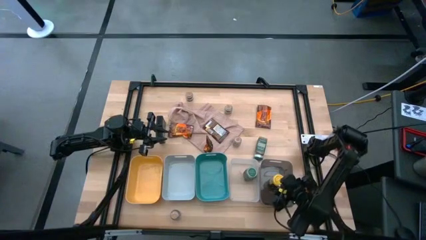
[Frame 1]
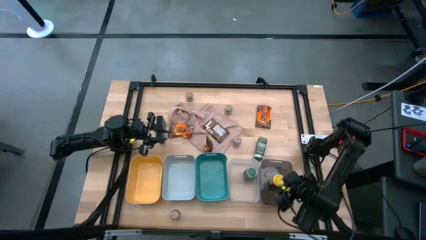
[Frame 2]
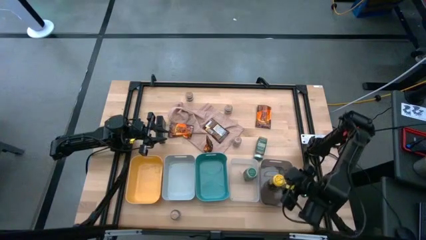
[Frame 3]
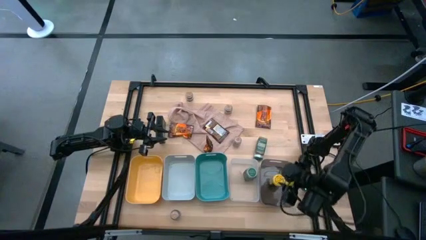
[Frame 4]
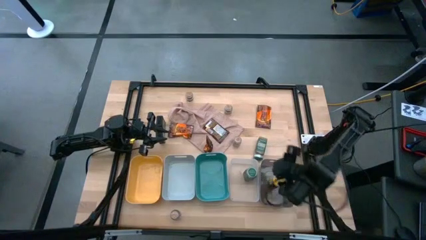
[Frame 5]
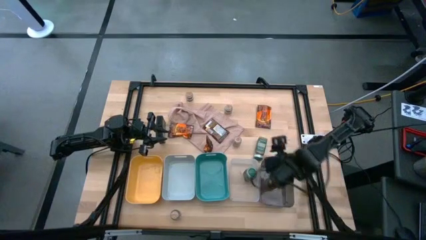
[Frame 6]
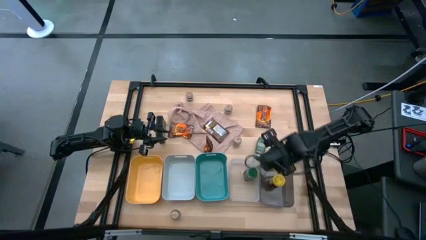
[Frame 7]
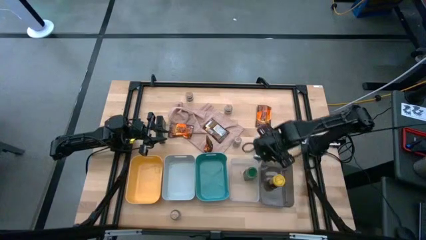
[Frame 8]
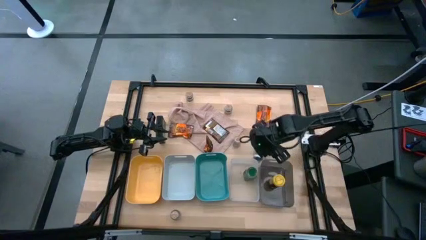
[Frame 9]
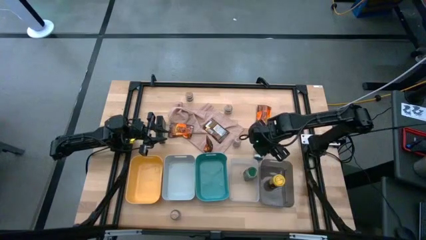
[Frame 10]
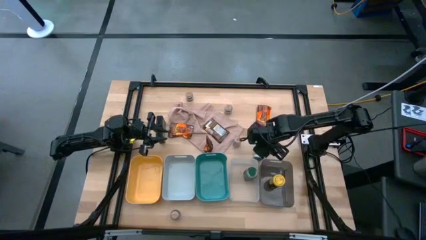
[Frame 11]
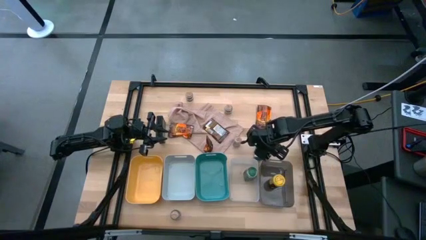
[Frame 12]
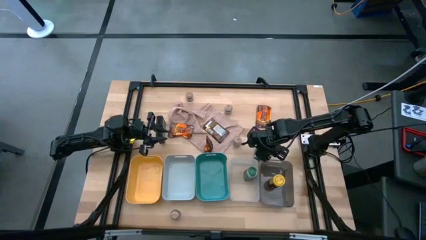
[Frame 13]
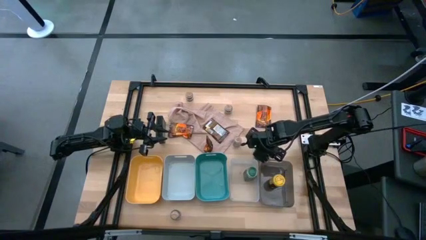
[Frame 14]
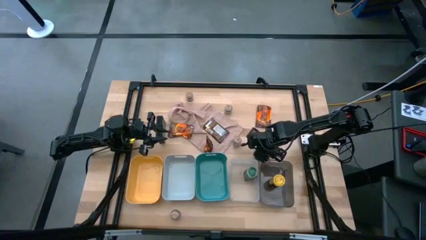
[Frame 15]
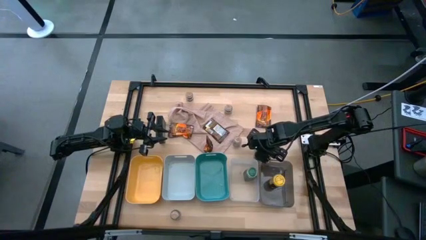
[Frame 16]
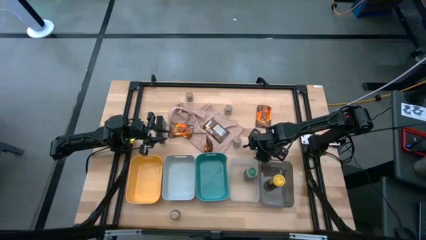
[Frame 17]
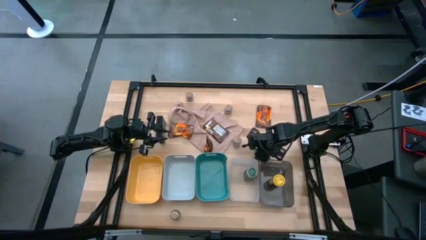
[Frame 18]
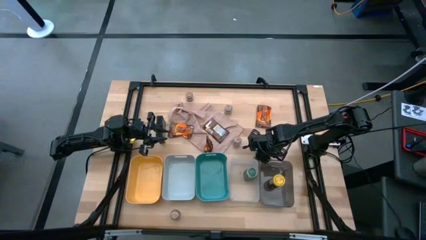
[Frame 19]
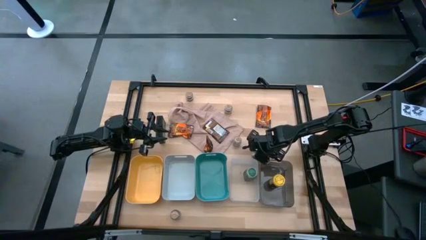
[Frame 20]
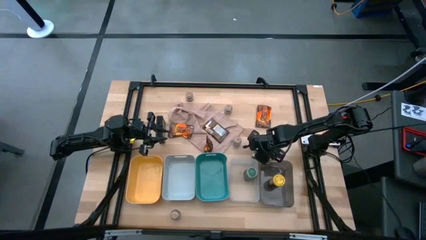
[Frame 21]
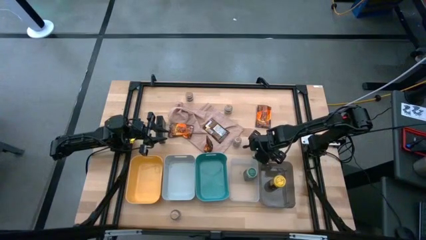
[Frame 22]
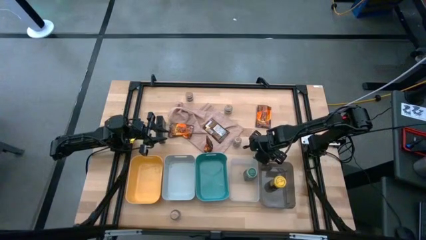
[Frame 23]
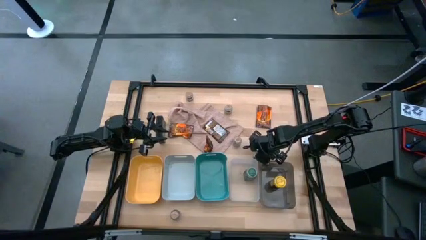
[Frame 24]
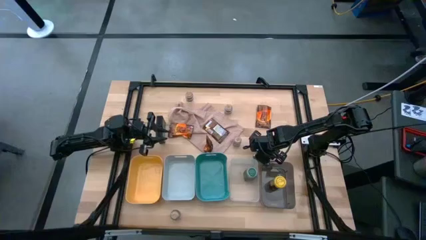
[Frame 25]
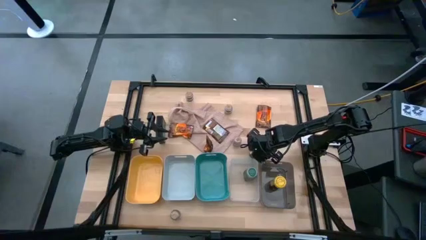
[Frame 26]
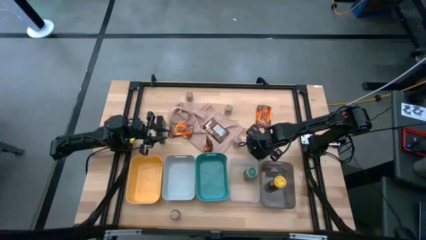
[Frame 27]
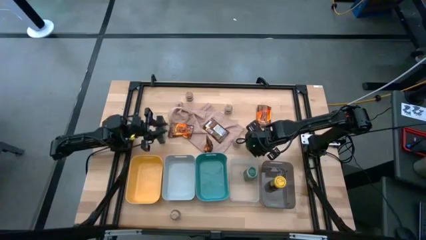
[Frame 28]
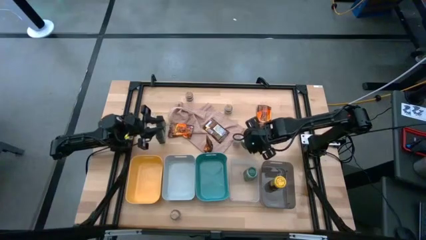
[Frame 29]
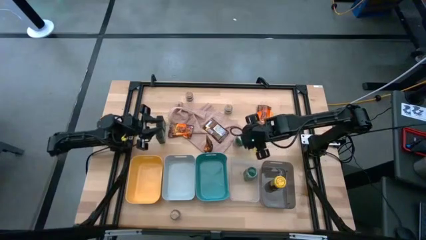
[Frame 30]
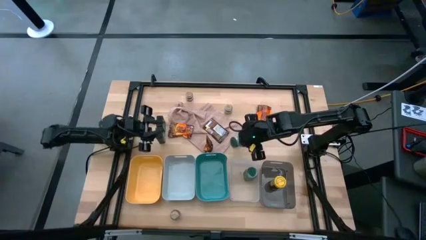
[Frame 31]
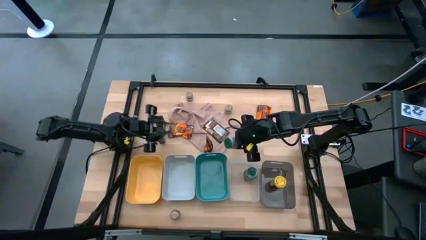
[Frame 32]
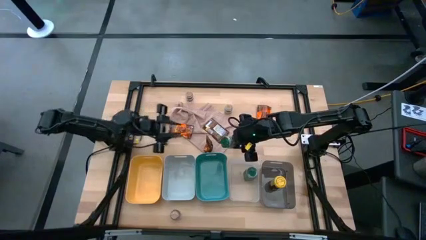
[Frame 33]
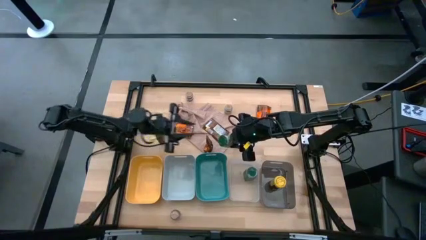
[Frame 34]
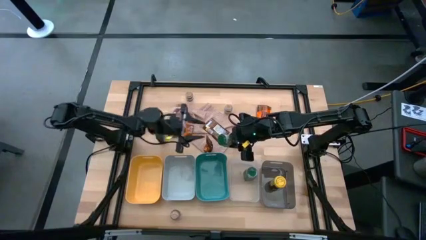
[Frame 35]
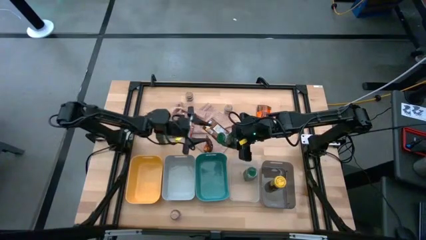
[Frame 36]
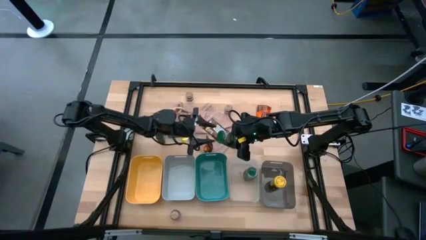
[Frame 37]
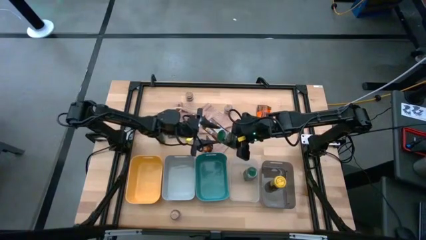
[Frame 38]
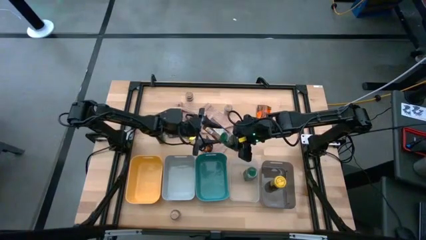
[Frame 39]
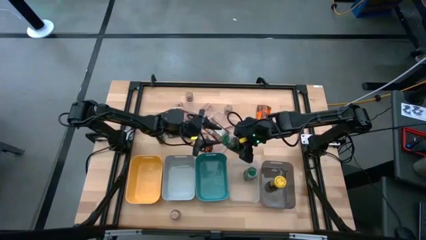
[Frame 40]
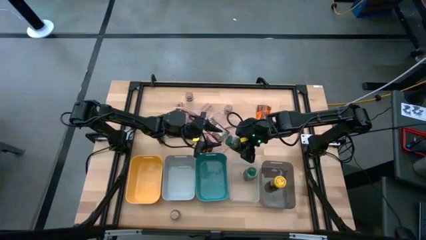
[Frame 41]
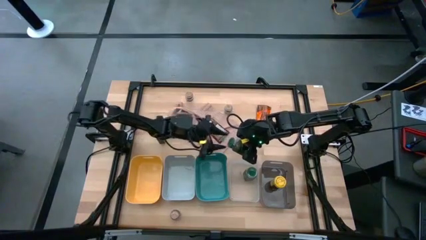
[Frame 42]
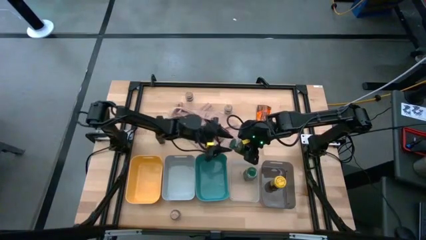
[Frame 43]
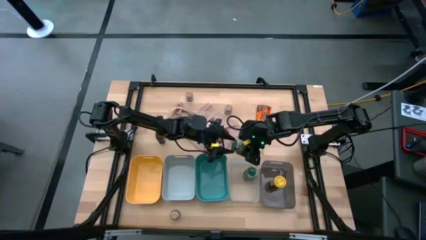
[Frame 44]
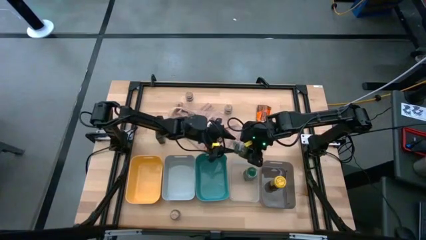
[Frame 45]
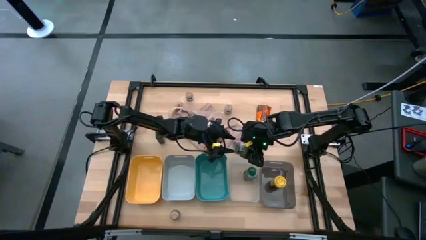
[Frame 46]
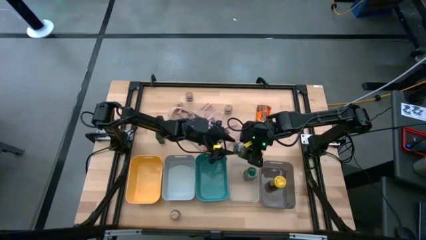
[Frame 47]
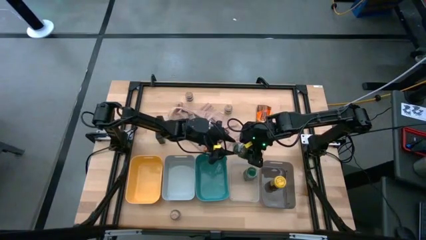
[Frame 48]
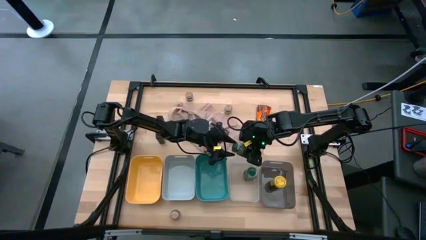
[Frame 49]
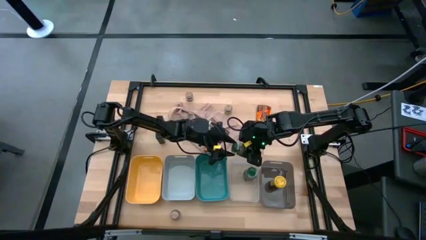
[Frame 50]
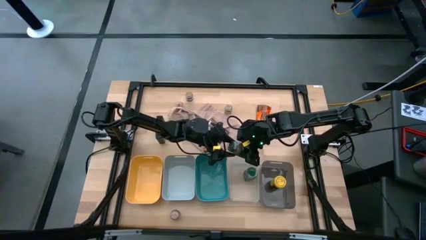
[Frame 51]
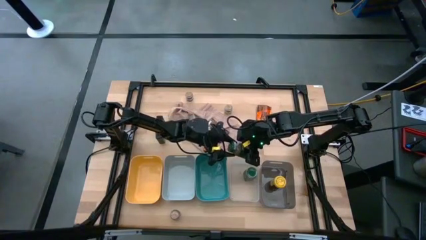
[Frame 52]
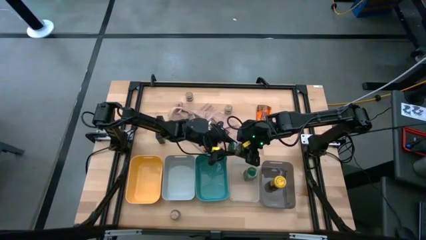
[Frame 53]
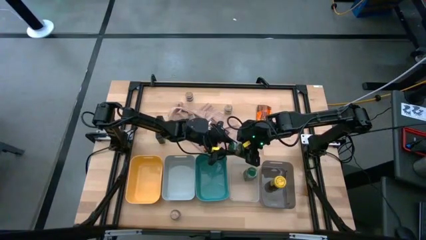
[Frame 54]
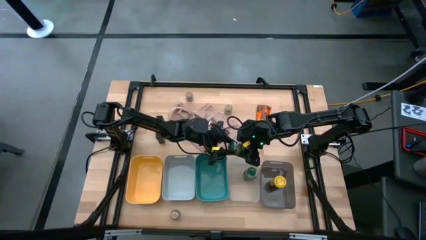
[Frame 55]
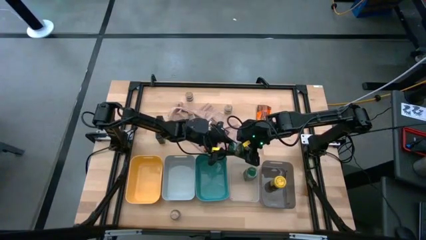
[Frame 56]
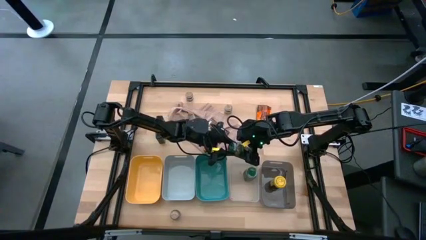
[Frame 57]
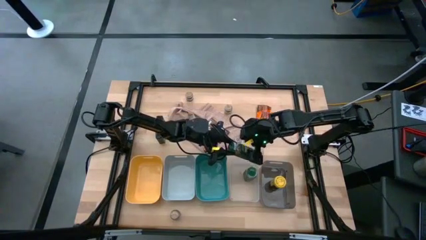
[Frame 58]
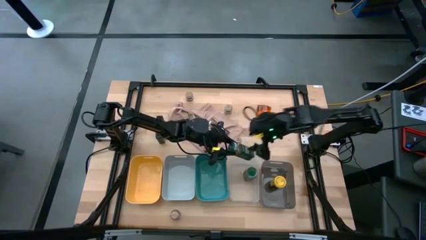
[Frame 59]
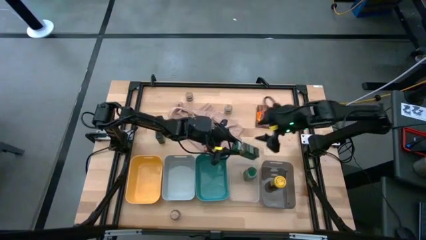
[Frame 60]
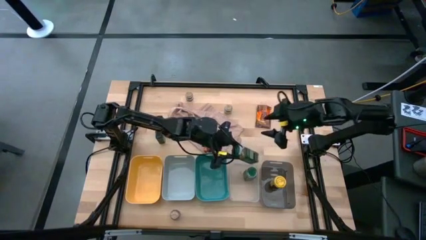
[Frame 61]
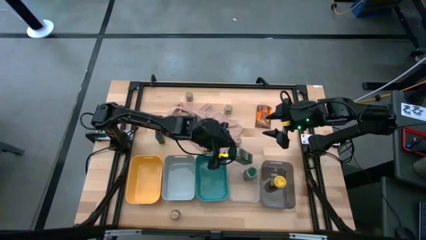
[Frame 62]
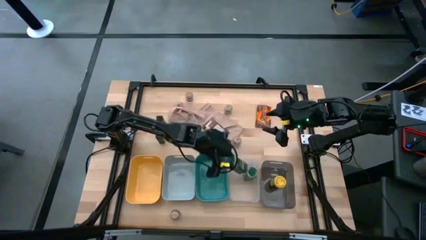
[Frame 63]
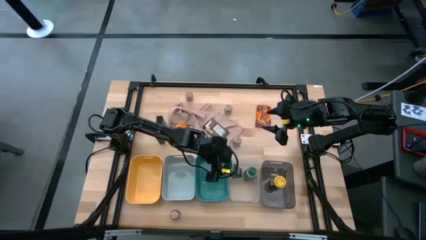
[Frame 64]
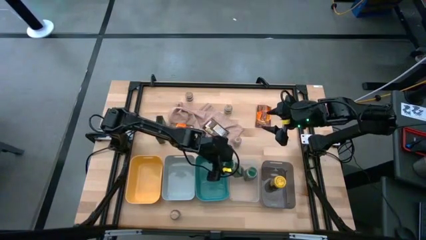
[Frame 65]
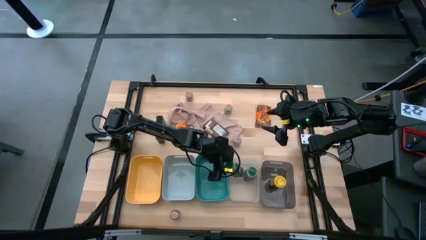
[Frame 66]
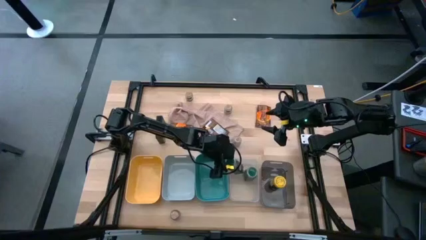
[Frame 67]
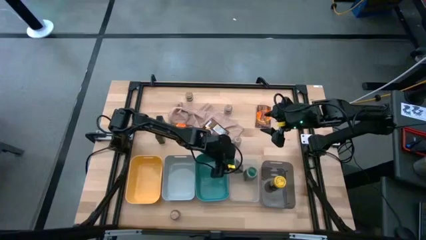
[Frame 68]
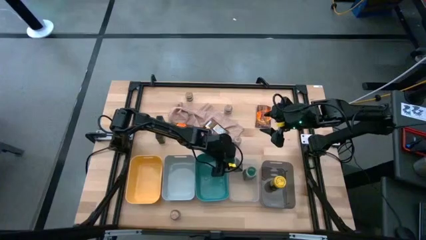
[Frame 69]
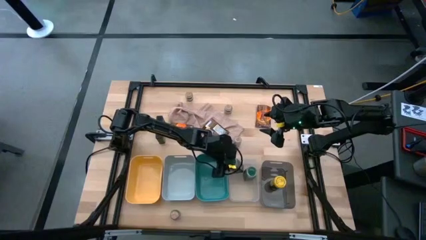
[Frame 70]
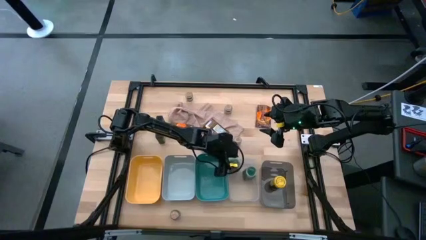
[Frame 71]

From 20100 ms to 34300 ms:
Task: Sort spices by type
Put the green seasoning bottle into the transparent bin
